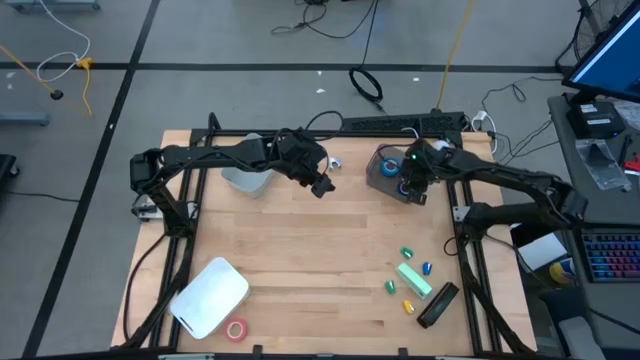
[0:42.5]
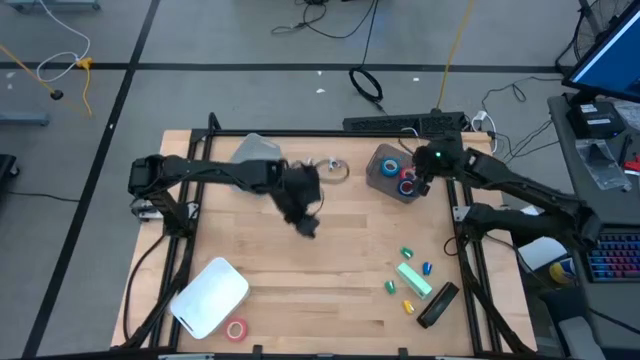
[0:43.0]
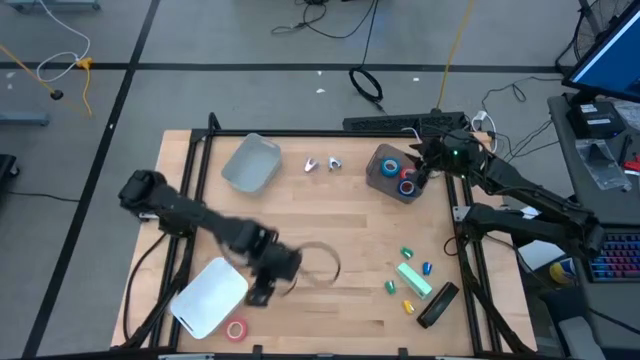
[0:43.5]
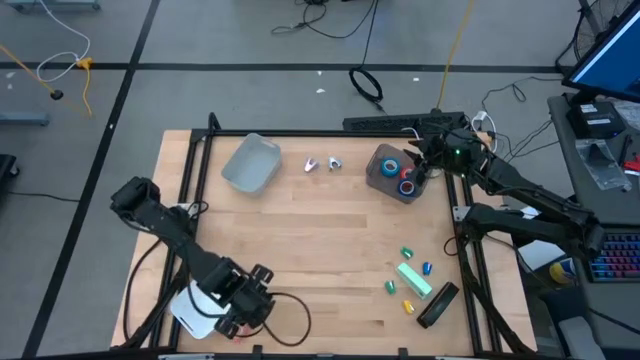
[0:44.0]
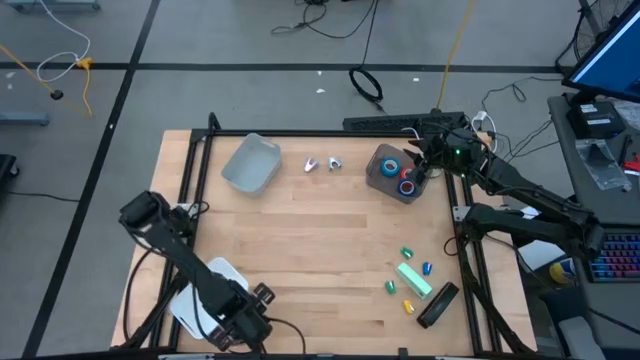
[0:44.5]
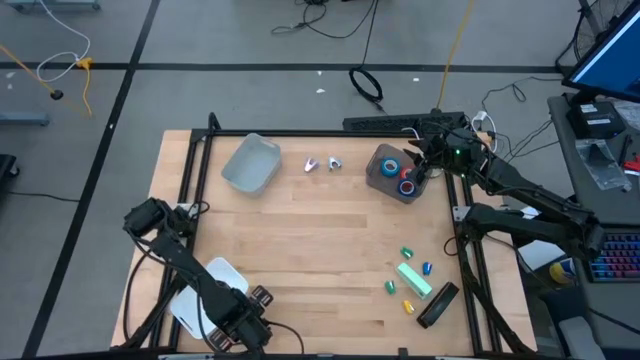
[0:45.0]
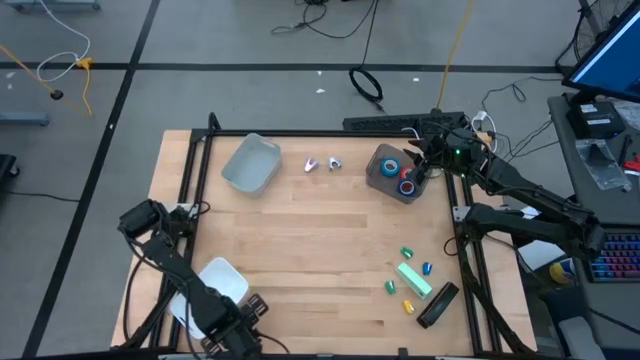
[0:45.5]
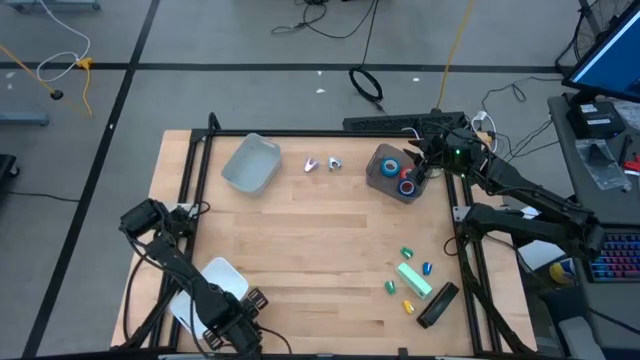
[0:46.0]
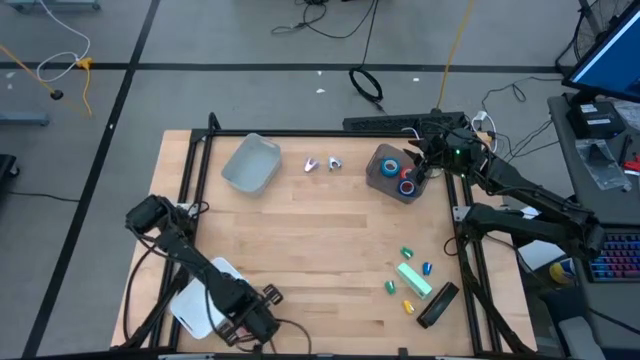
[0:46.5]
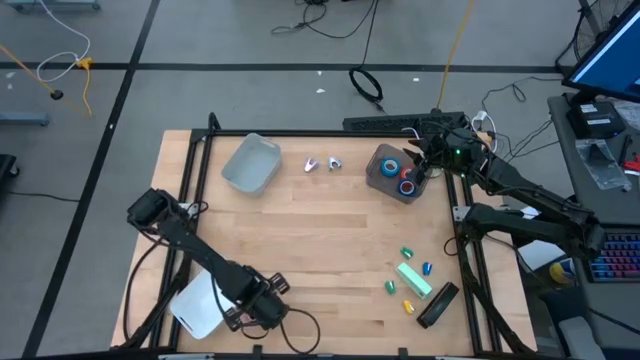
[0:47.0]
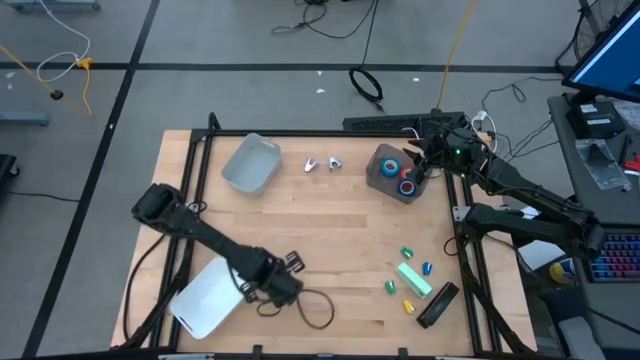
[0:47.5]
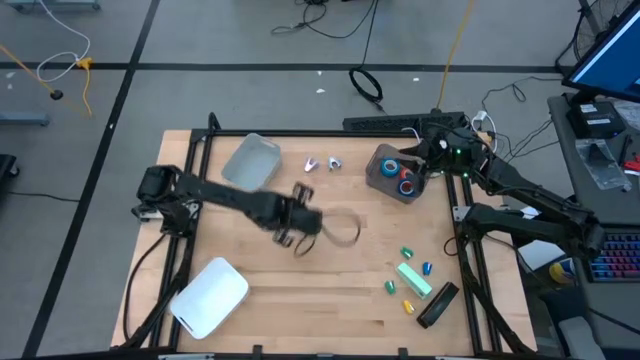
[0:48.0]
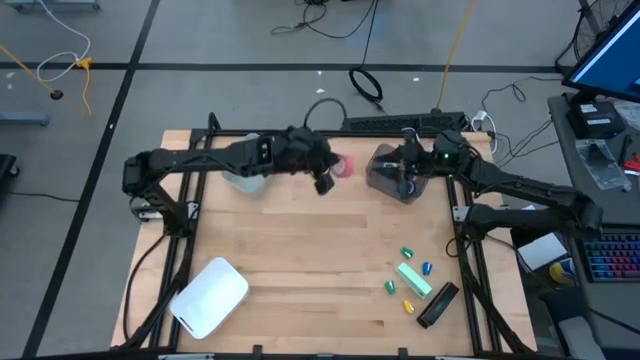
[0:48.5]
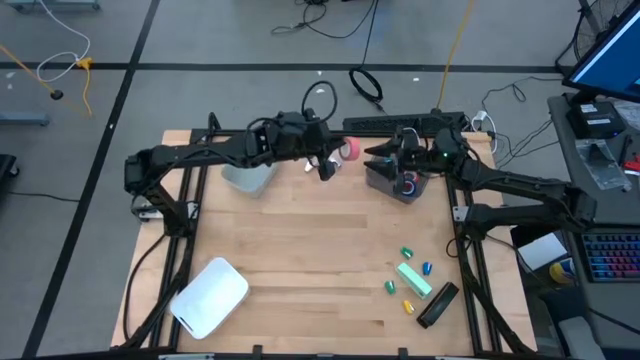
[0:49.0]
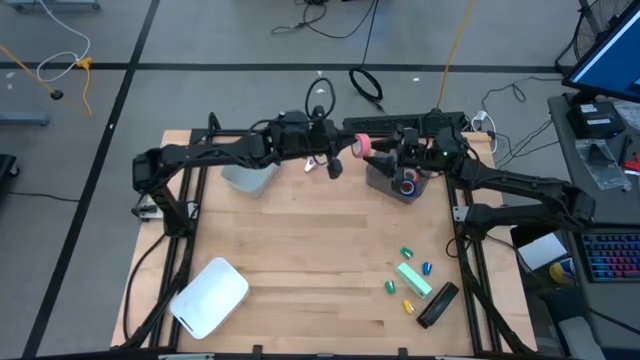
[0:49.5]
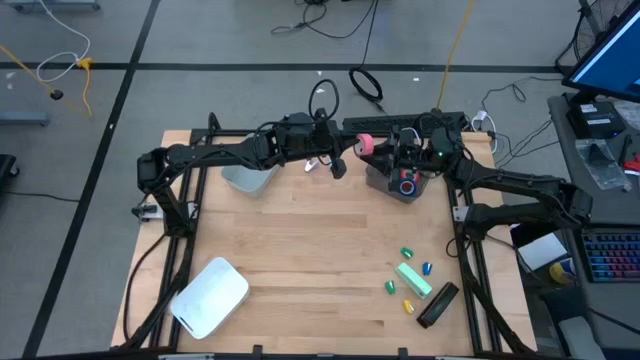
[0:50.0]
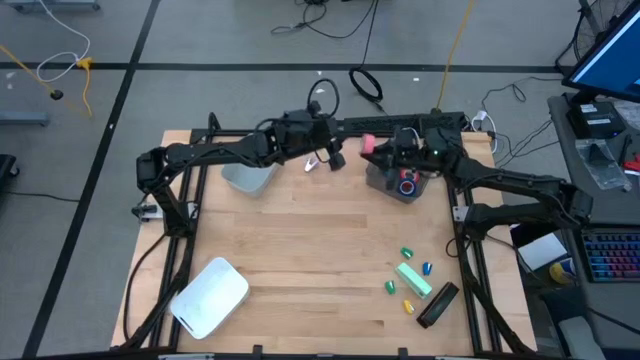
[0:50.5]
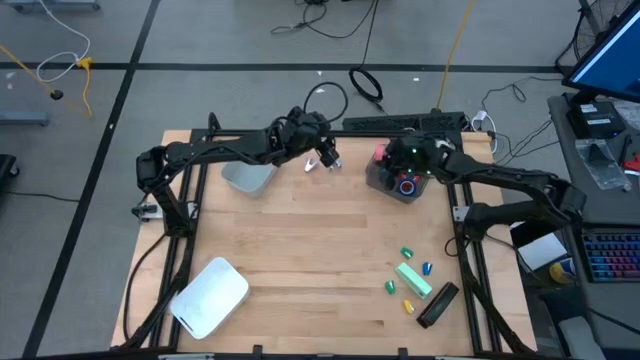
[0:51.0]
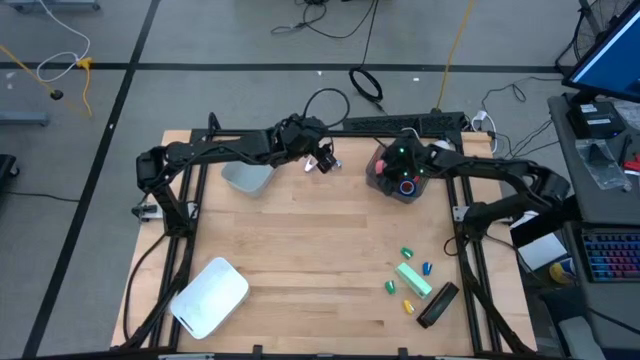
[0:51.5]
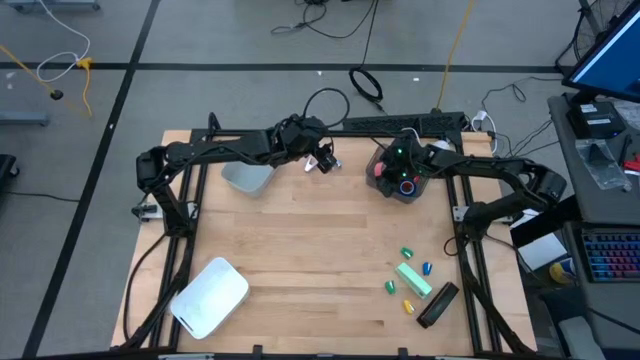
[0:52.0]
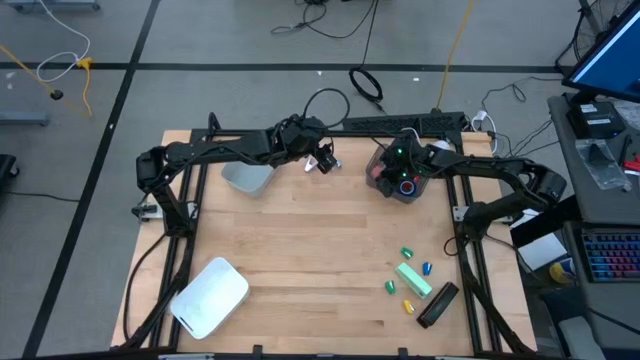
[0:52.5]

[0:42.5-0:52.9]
Task: Pick and place Stapler, Stapler remover, tape
Put the pink tape into the black bin

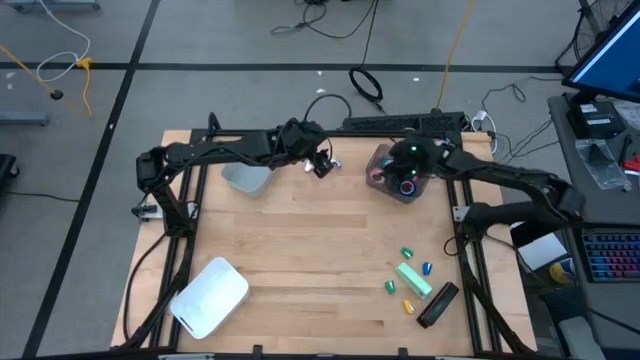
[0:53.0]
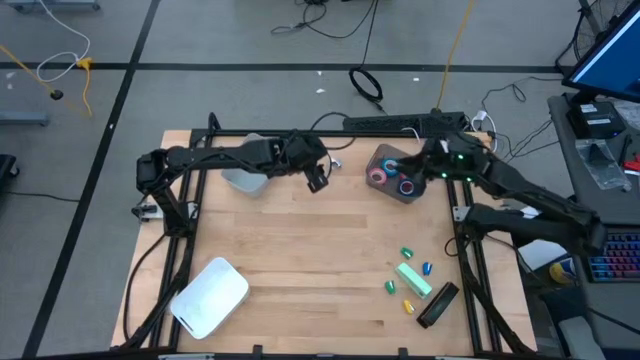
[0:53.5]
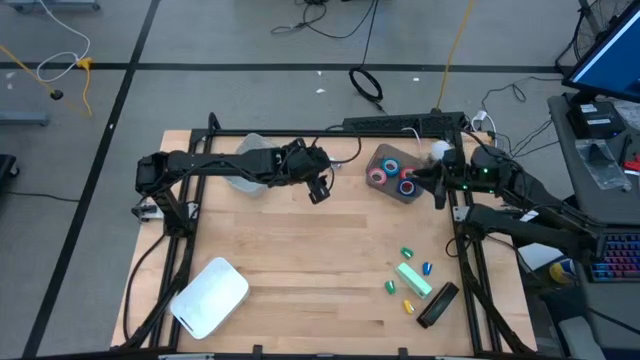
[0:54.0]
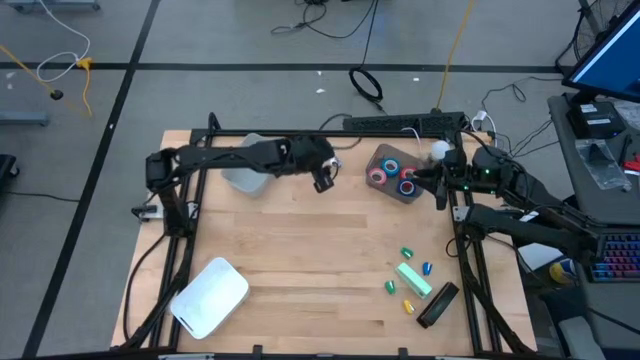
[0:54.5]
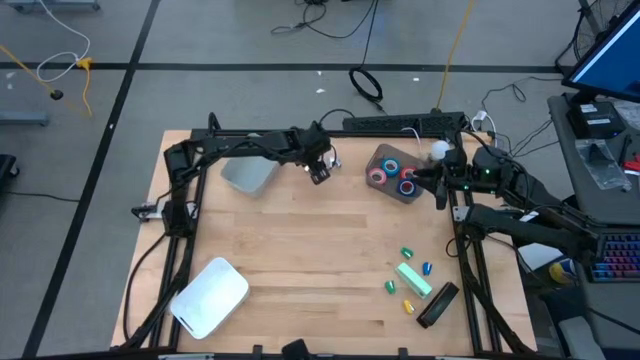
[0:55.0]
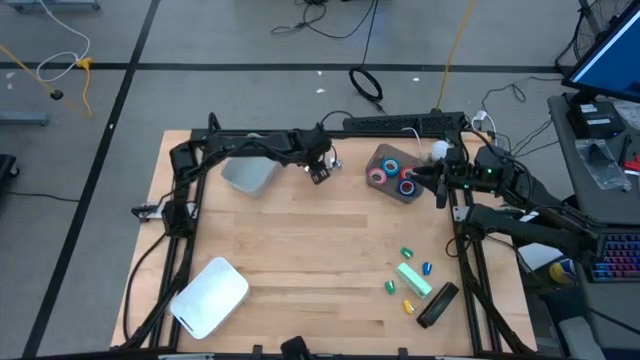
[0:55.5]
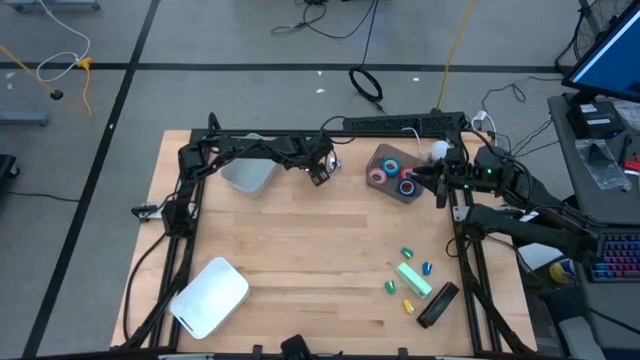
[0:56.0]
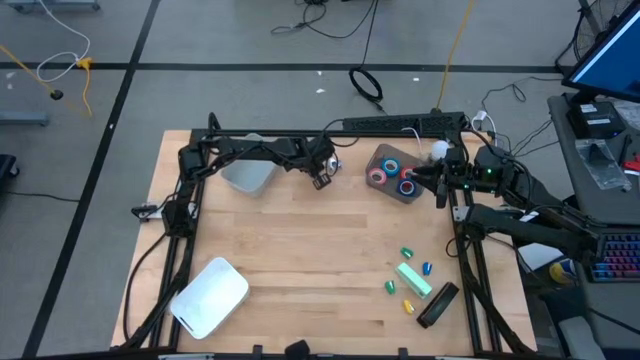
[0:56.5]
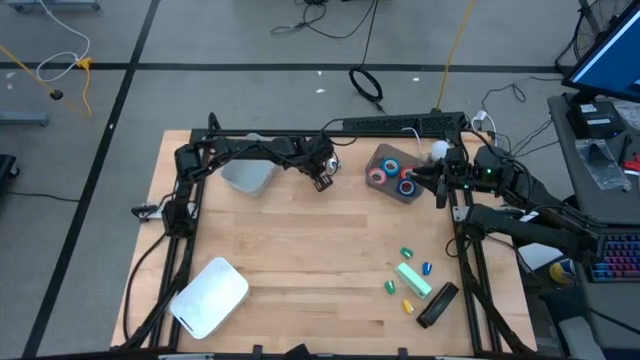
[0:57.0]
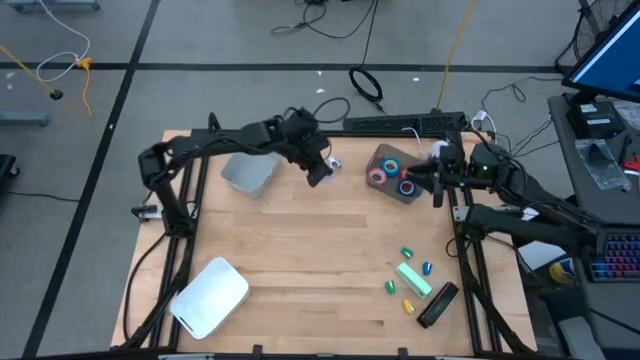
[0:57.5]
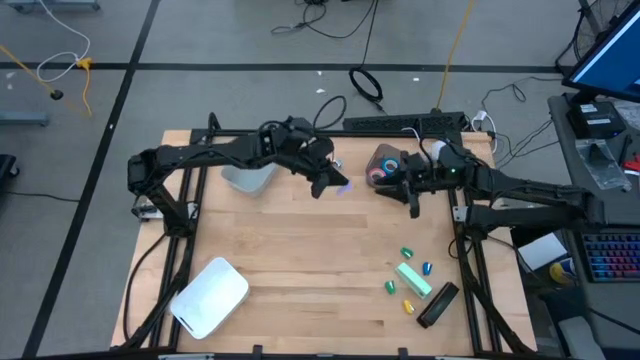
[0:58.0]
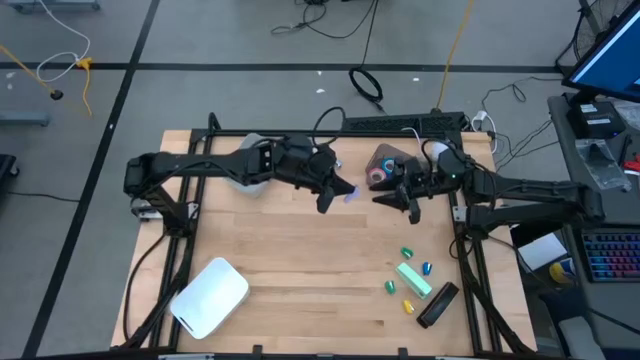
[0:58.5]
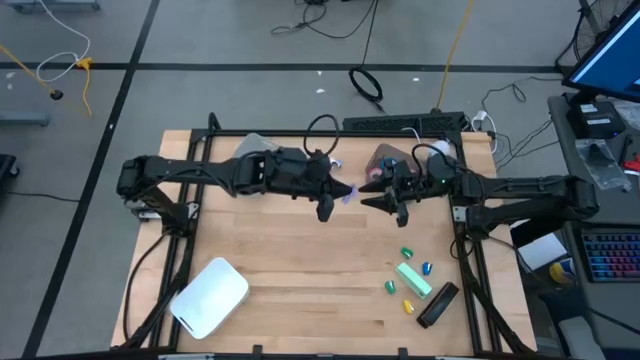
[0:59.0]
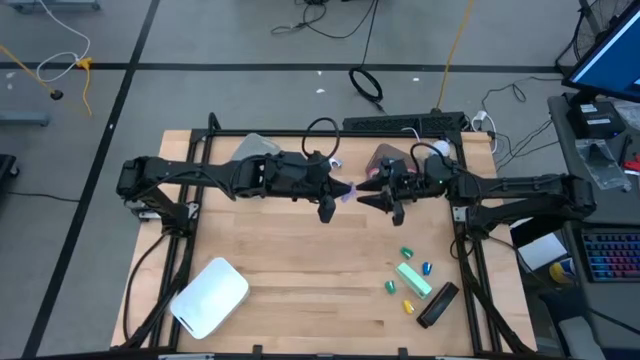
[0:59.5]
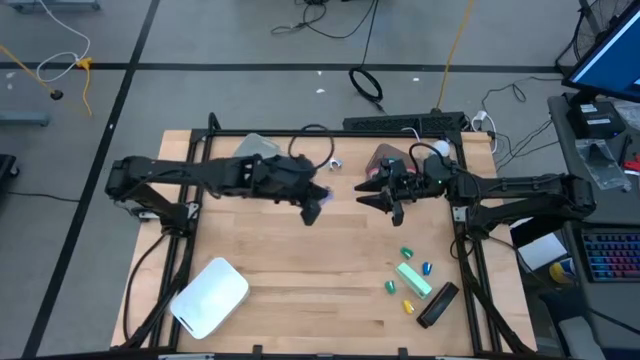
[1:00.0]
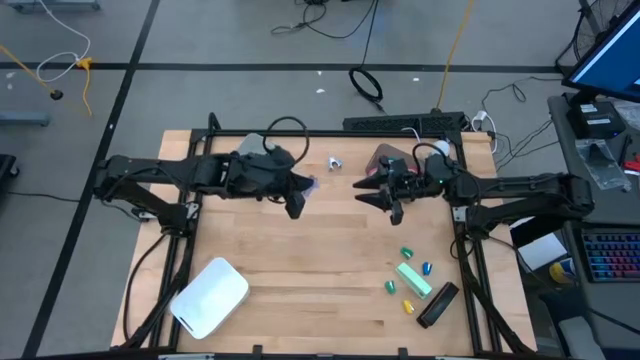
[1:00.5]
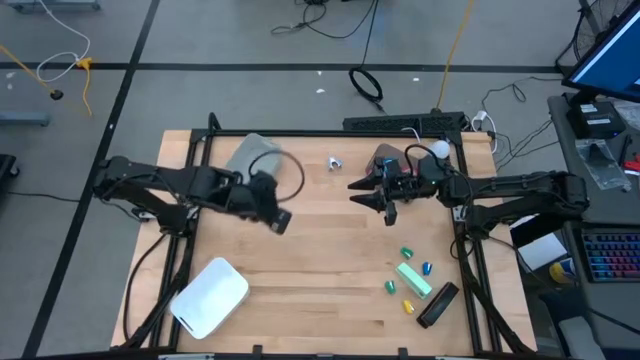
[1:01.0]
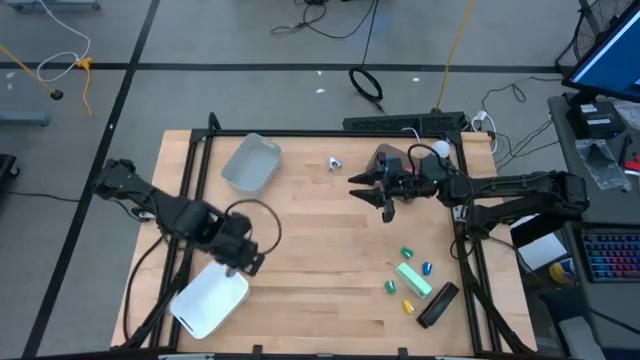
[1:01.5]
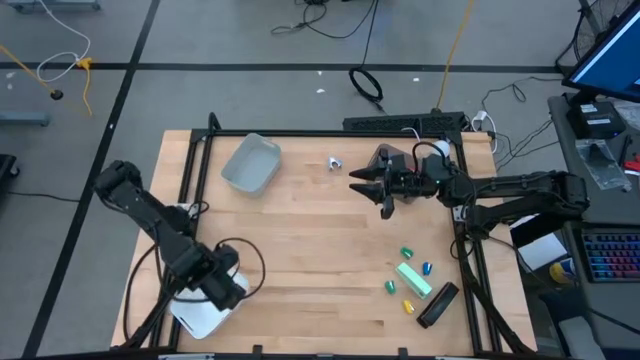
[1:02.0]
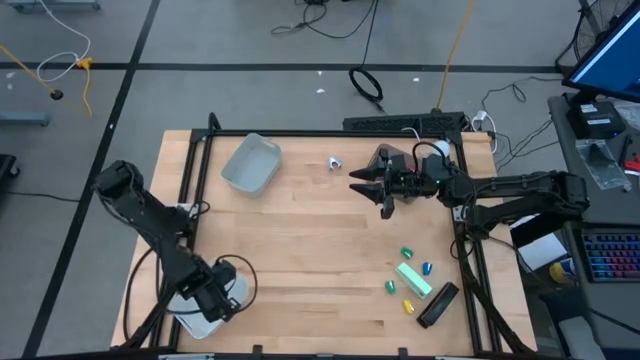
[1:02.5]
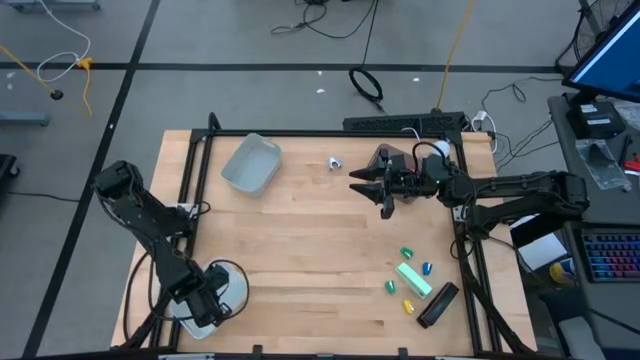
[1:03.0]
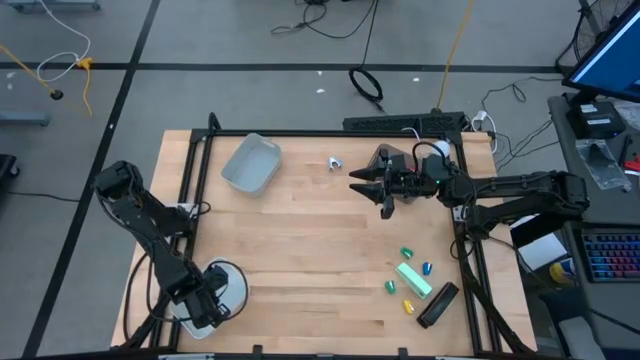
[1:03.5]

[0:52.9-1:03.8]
Put the purple staple remover into the white bin
